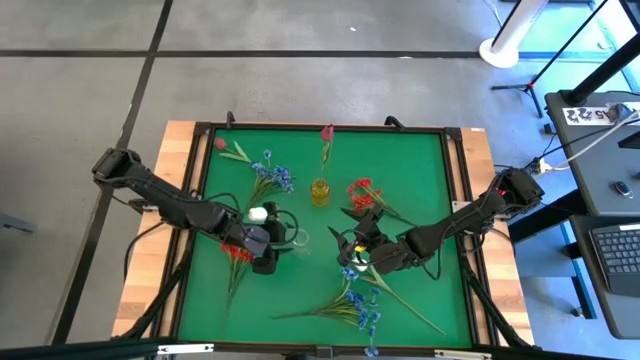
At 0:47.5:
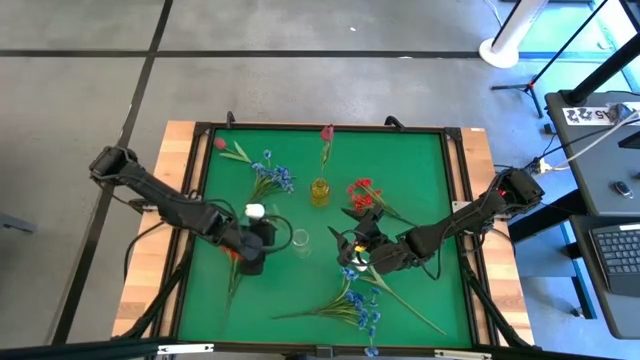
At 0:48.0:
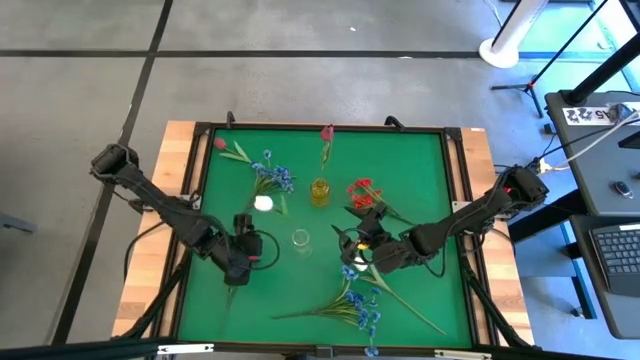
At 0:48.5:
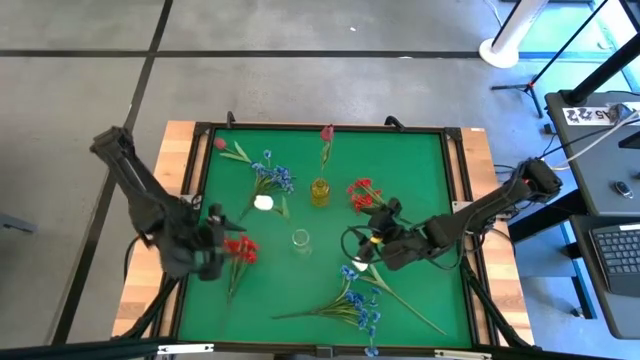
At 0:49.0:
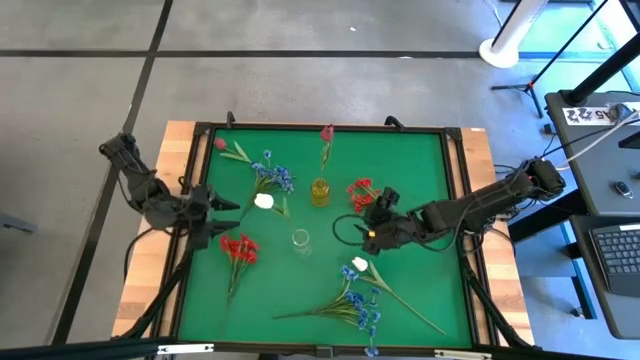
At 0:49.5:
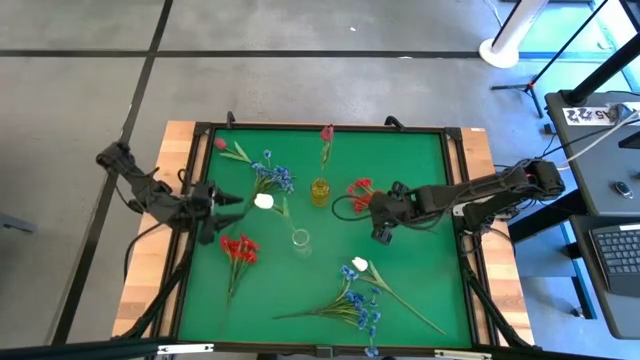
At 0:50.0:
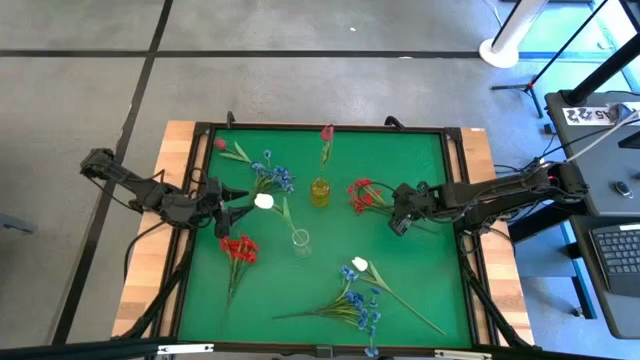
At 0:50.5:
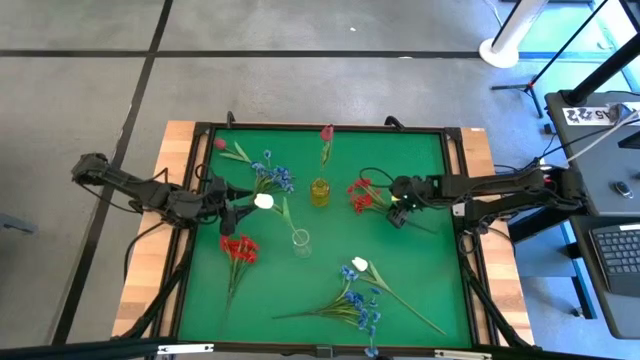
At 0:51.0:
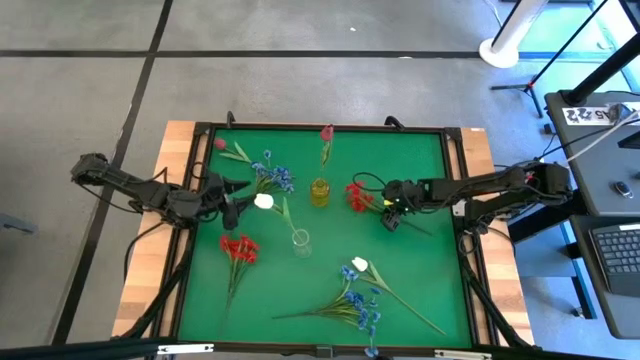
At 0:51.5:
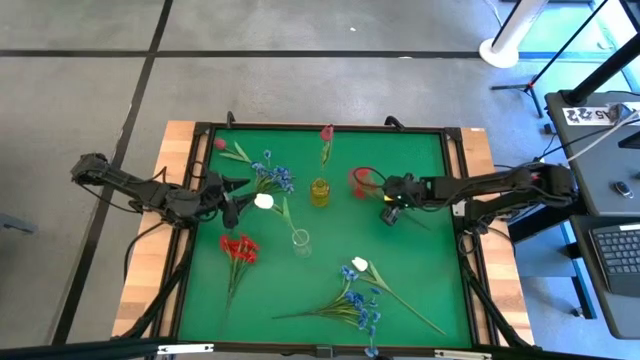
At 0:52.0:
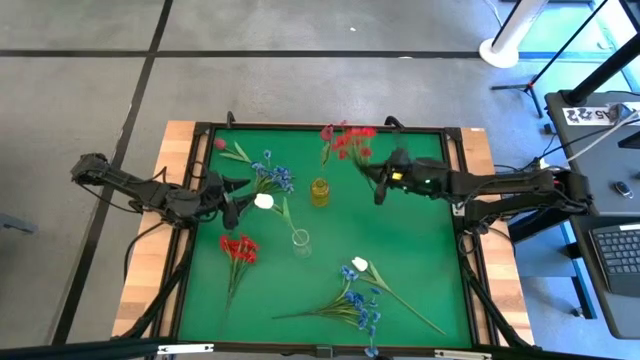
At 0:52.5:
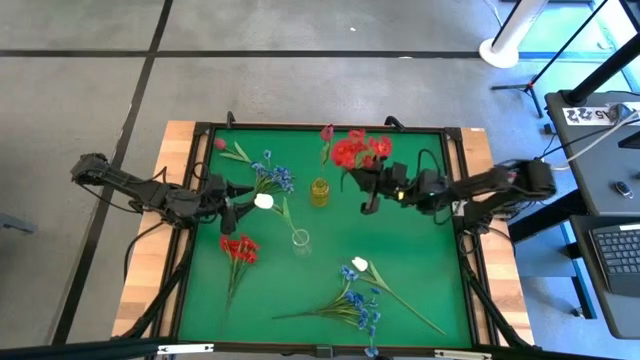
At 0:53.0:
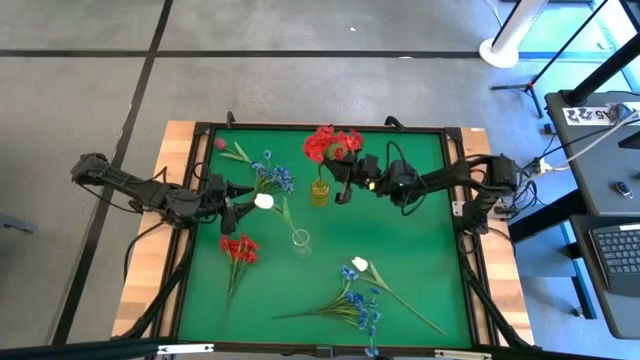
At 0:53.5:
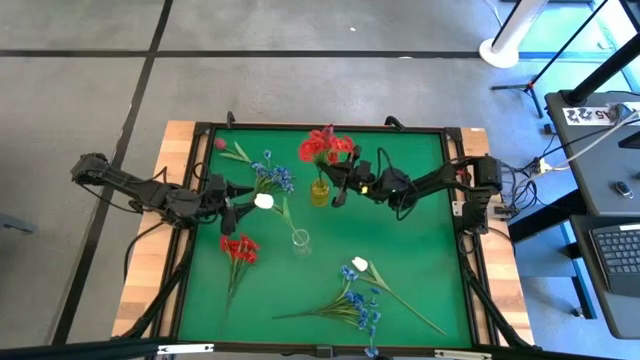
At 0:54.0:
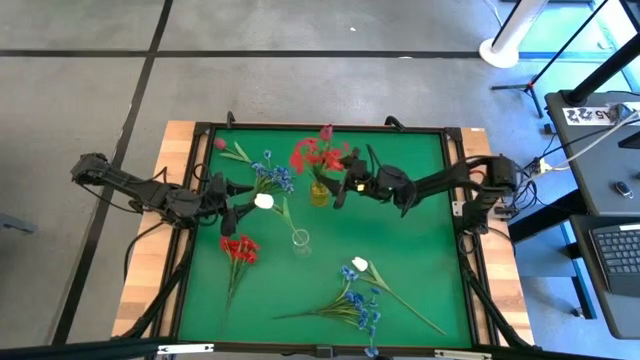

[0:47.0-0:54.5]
Task: Sort flowers into vase by color
Put the right red flowers into the yellow flower vase

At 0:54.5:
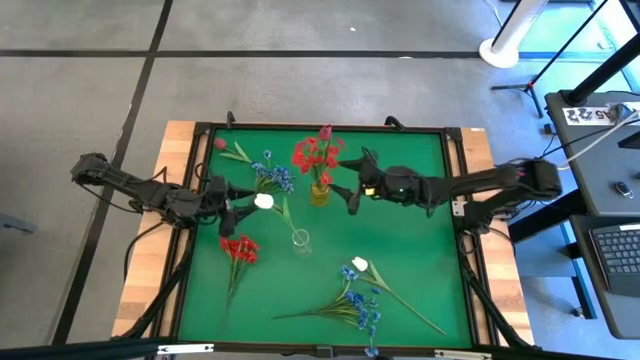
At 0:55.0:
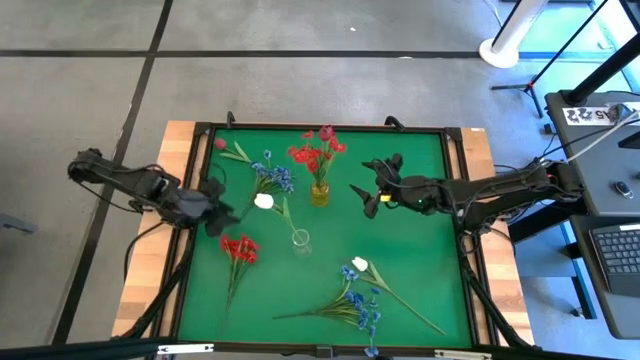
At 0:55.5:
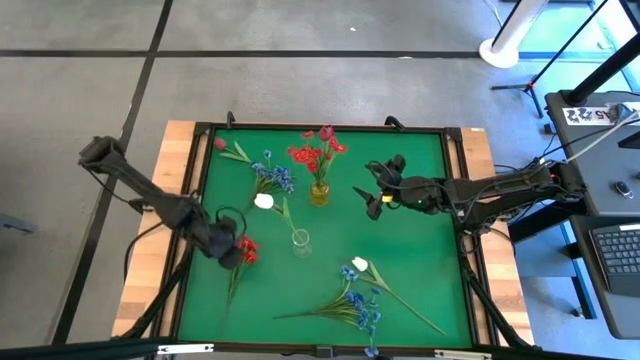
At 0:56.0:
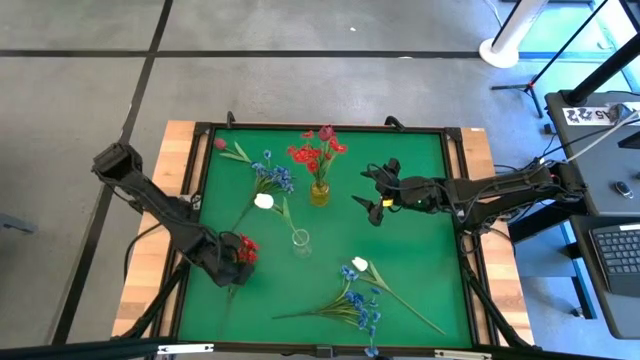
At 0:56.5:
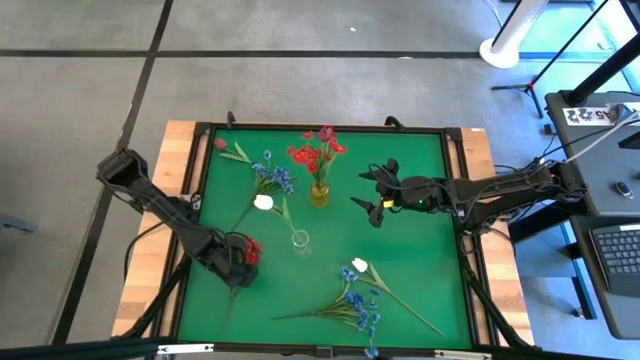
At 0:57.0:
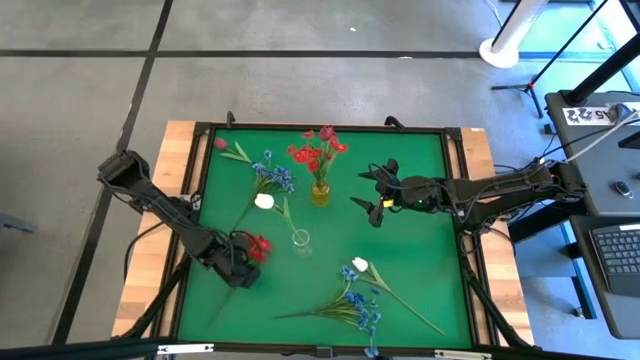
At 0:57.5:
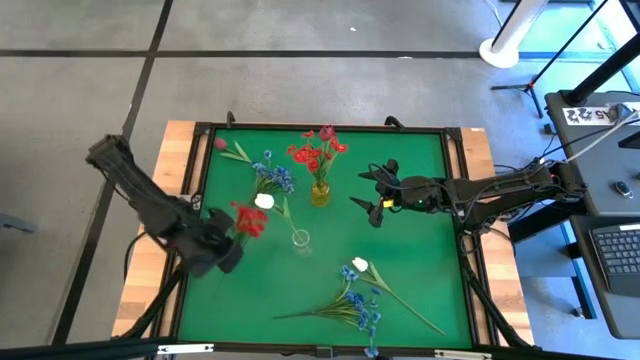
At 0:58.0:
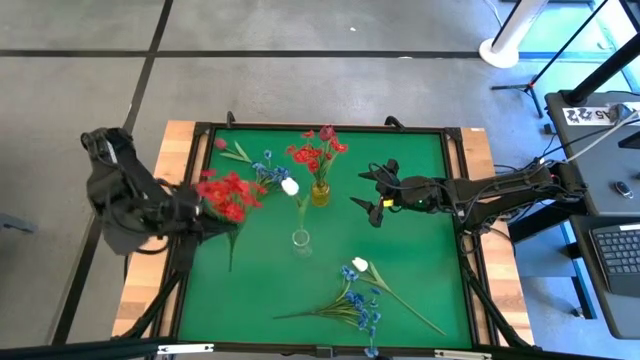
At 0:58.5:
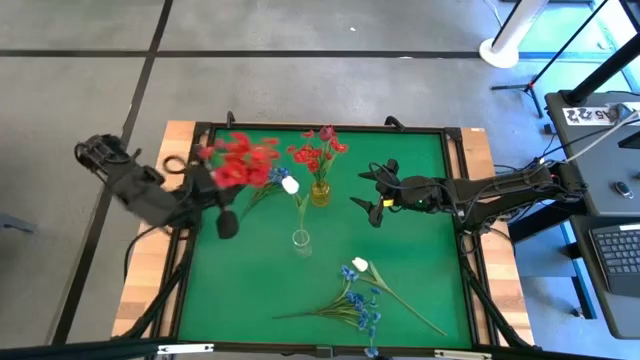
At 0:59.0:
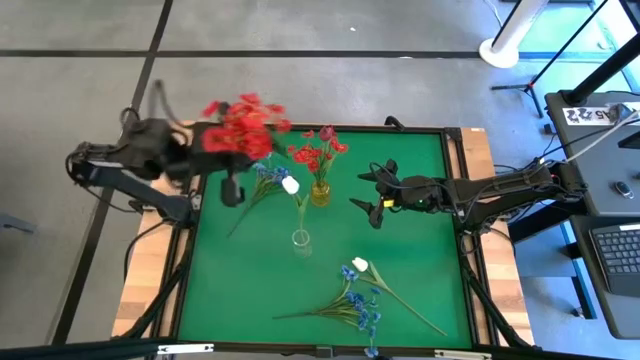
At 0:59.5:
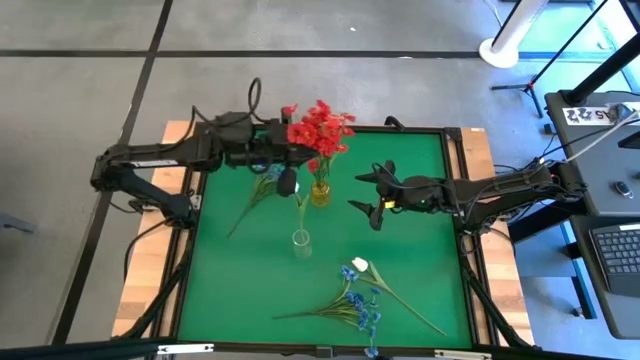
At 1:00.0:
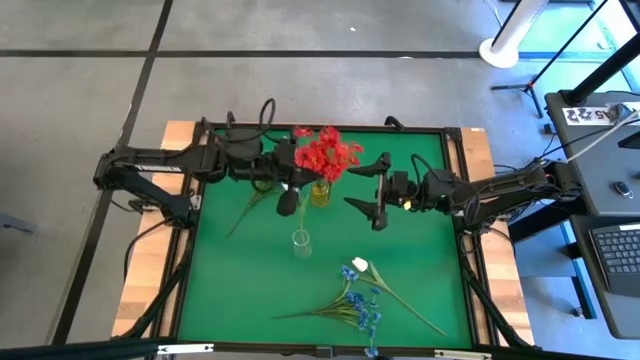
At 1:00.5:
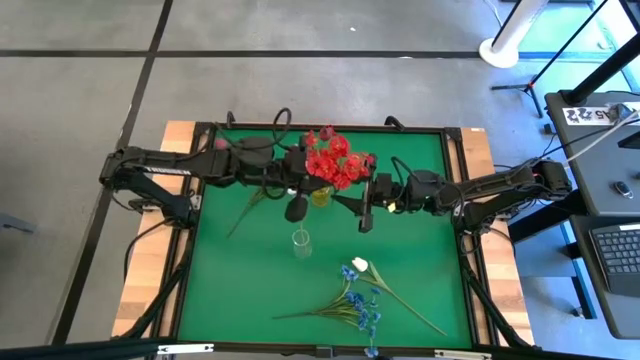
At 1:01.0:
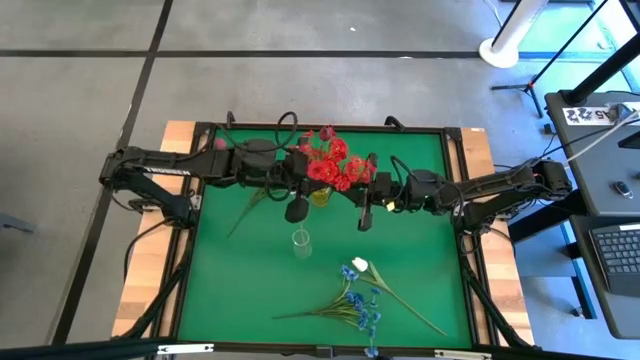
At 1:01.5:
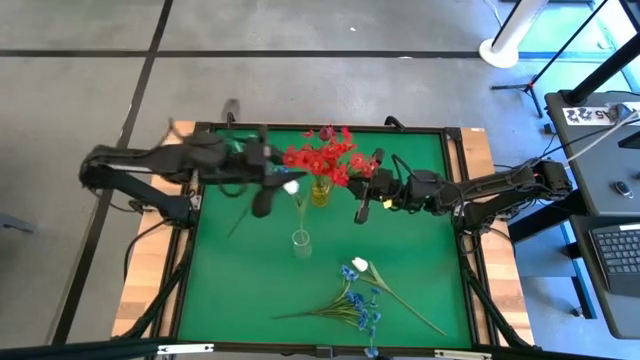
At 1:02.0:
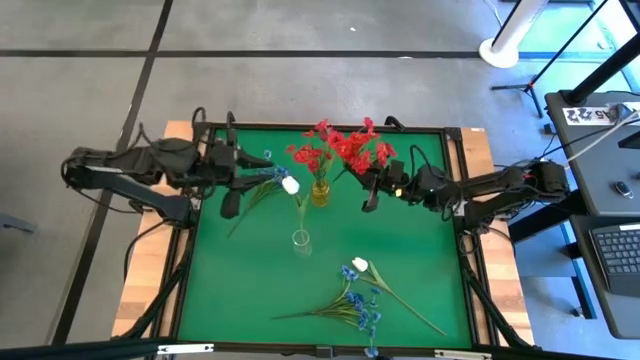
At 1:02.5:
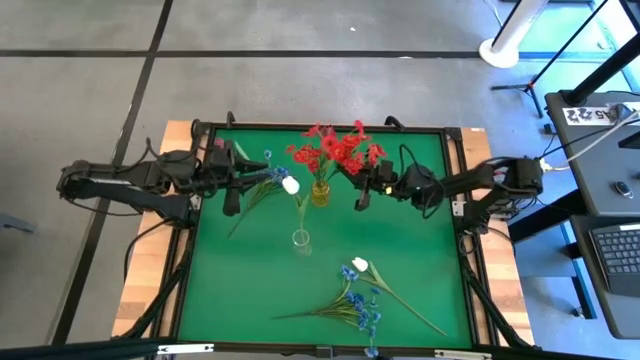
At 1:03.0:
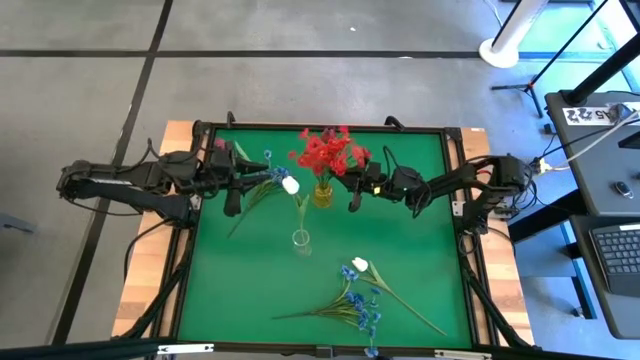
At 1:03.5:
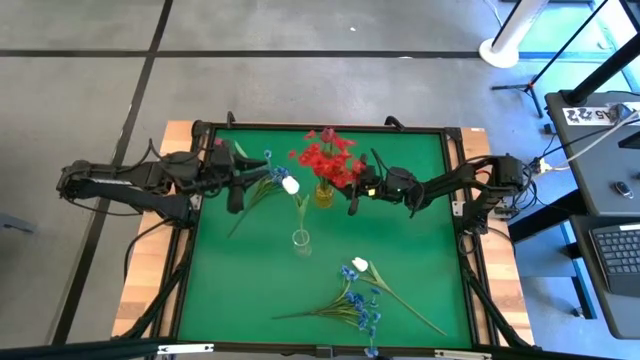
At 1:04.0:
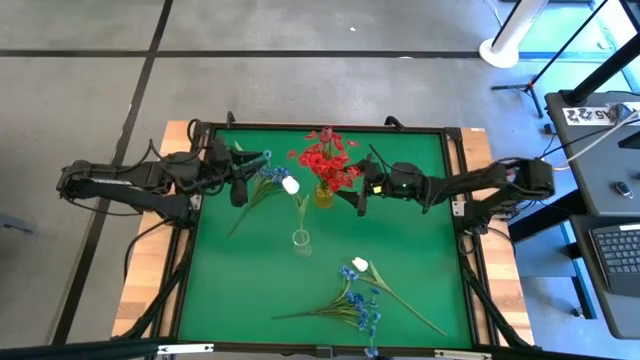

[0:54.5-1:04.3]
Put the red flowers into the yellow flower vase

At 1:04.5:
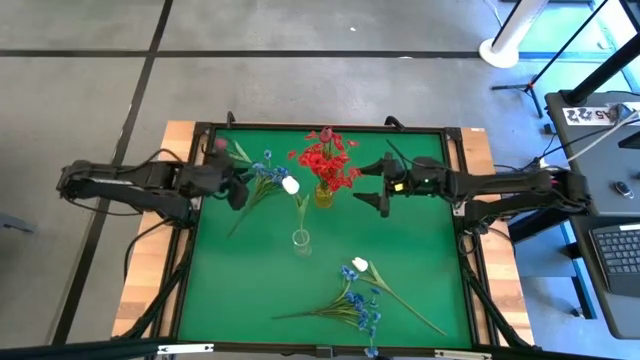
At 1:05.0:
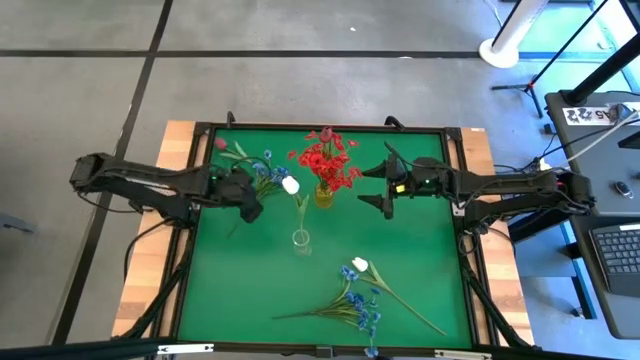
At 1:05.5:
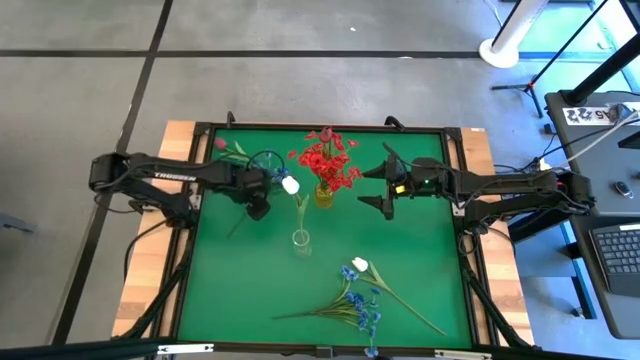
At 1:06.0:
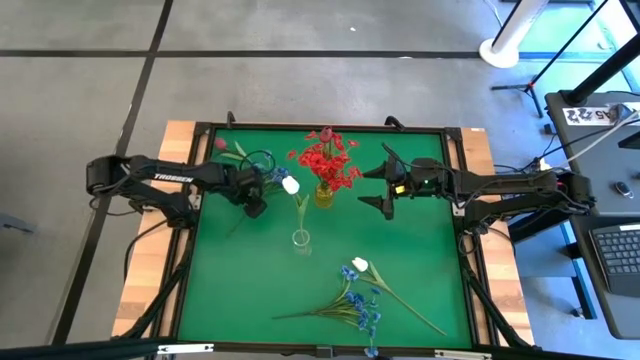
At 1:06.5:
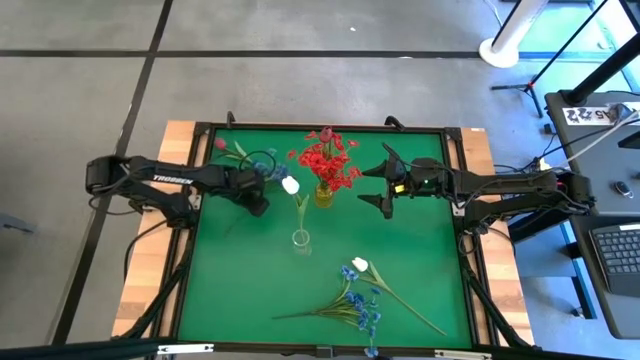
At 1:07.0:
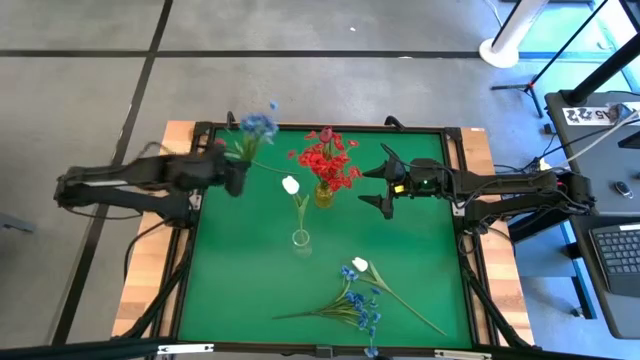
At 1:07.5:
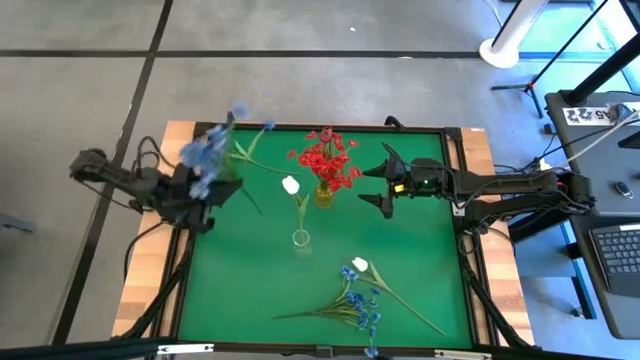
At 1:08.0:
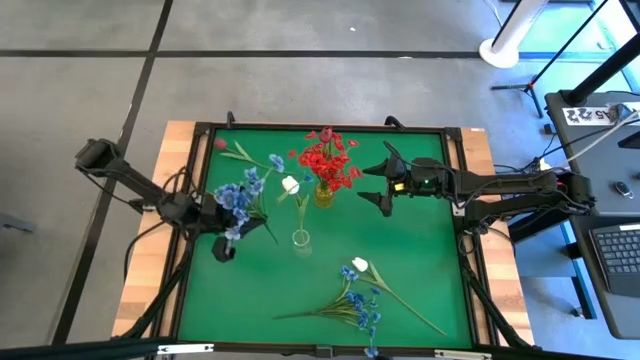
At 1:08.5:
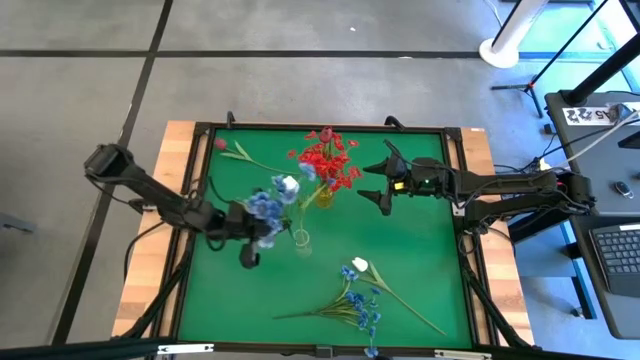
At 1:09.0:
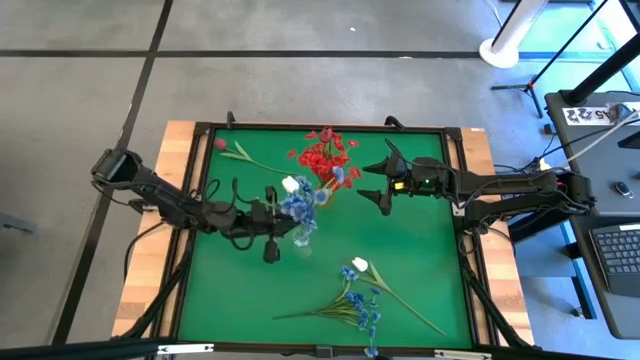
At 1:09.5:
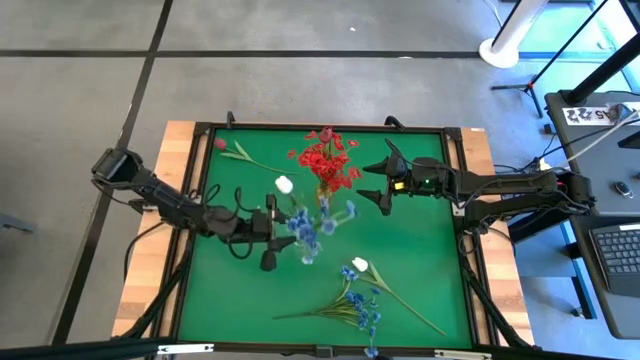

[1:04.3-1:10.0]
Put the top blue flowers into the transparent flower vase
